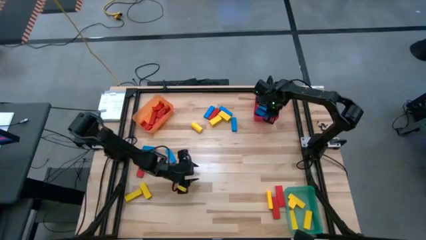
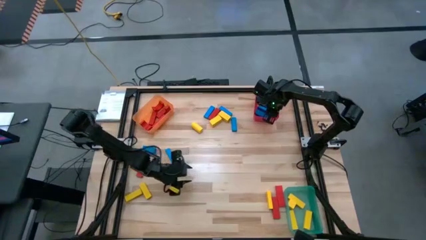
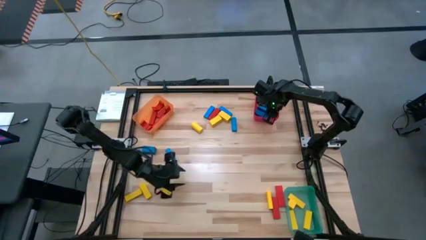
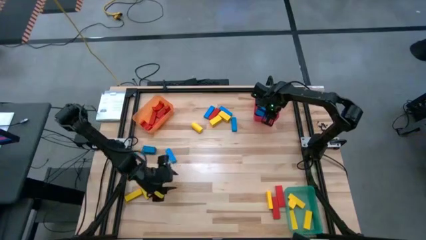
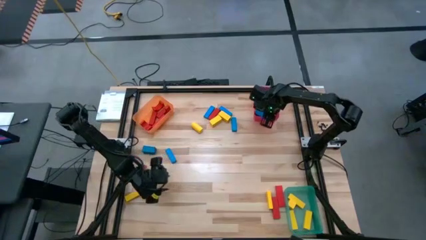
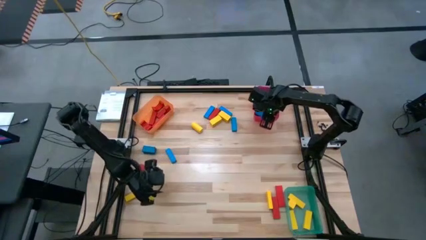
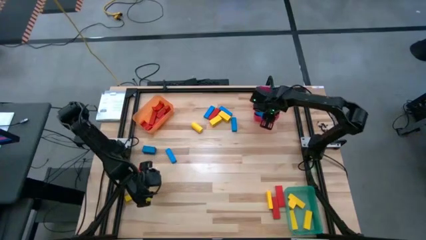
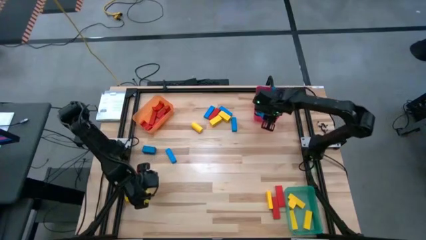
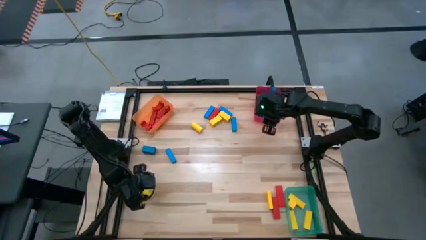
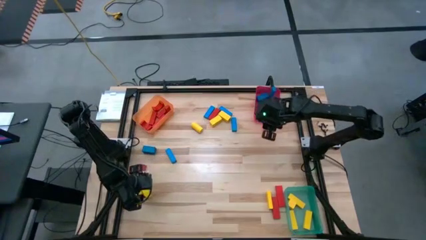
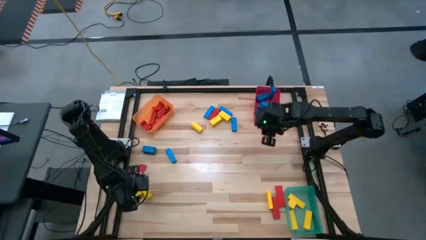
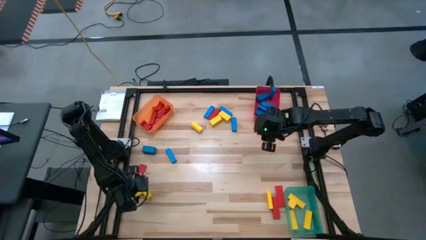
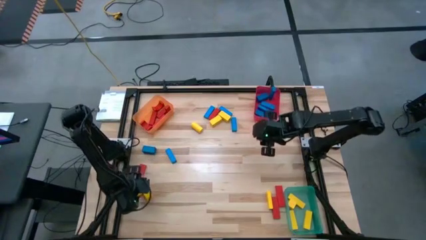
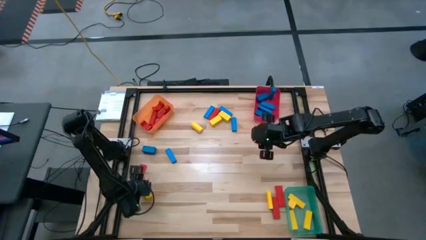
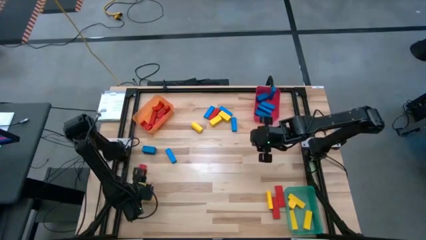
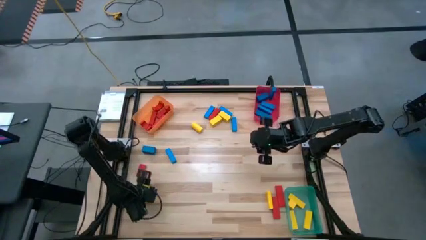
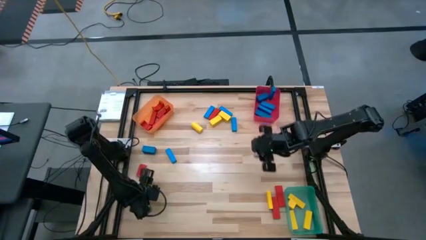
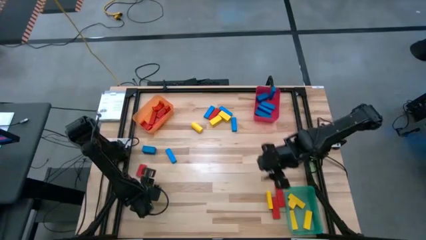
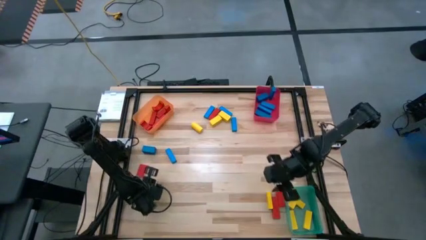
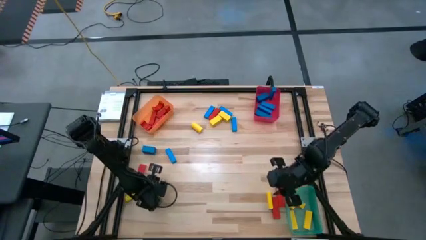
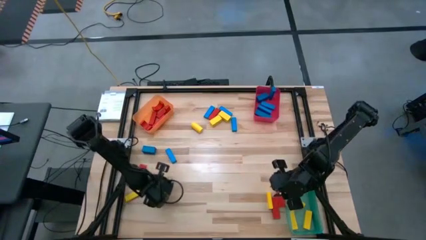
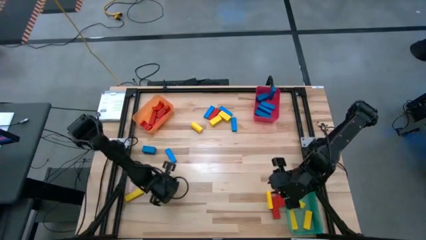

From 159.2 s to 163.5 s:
Task: Sort blocks
Put the yellow block into the green bin

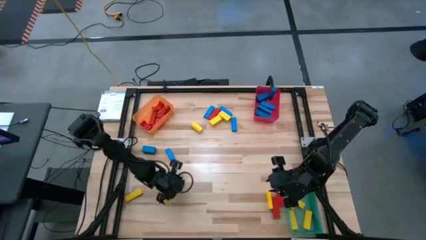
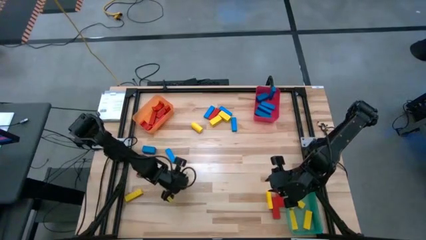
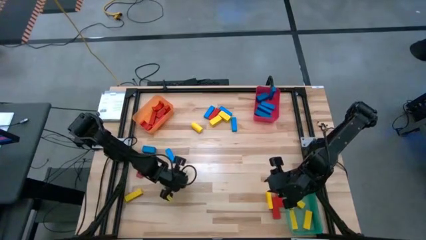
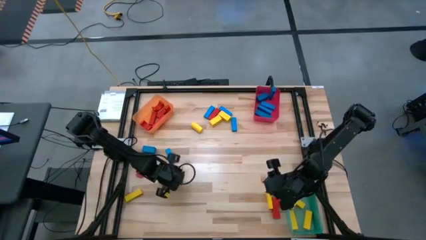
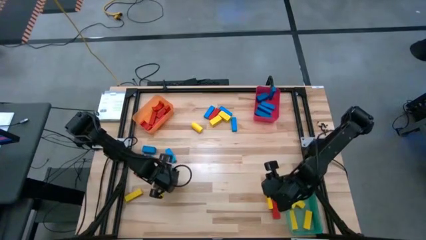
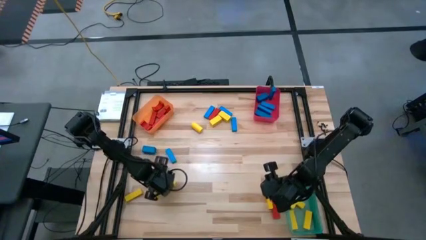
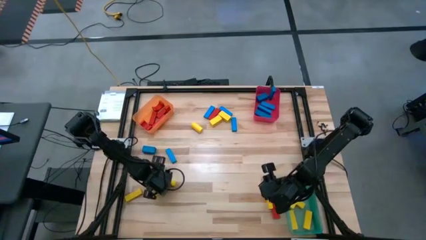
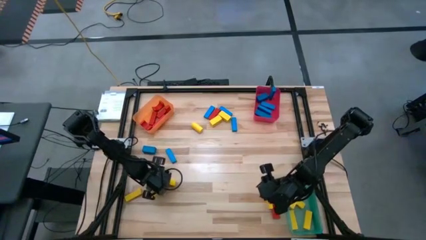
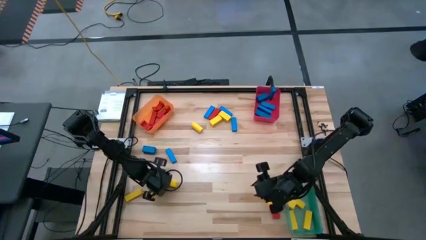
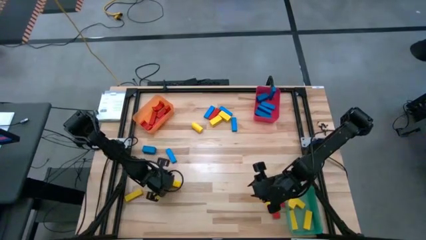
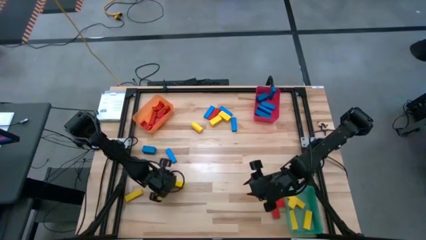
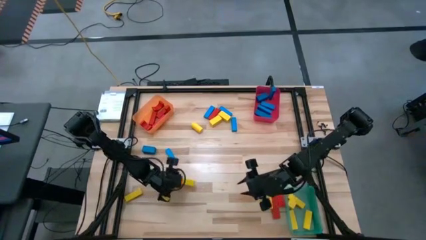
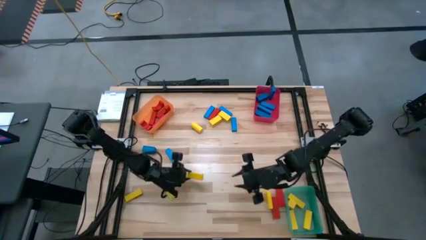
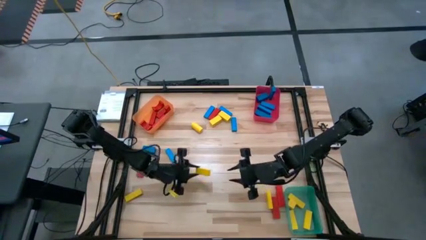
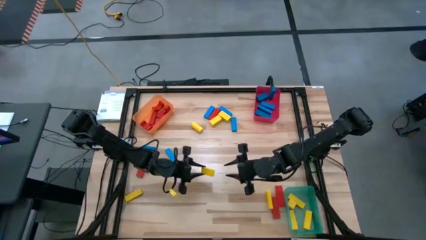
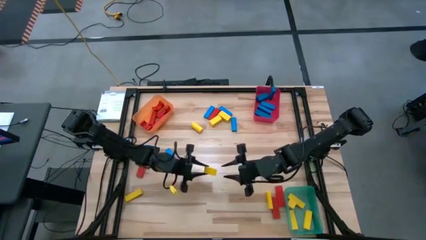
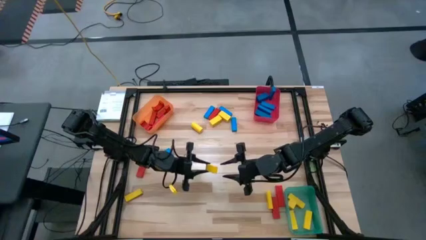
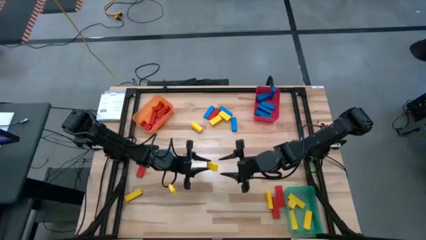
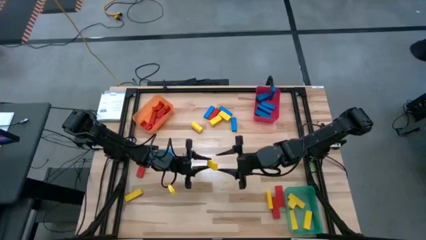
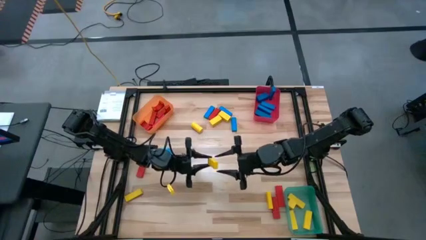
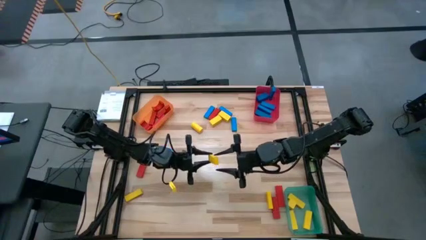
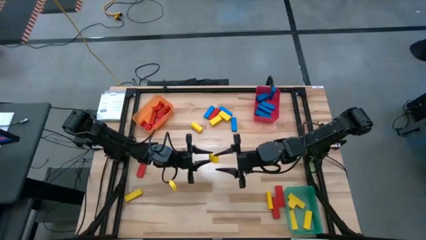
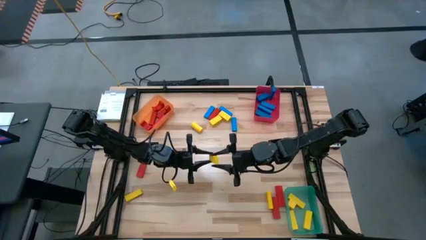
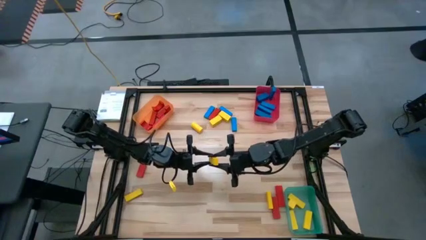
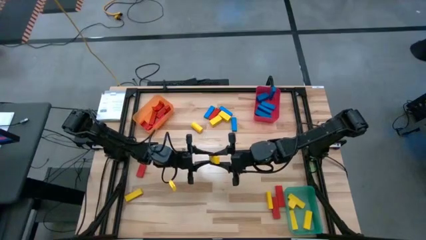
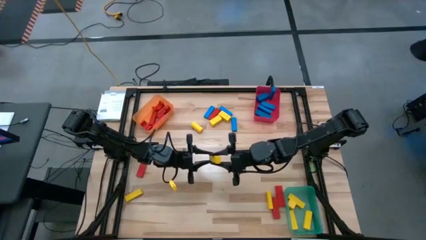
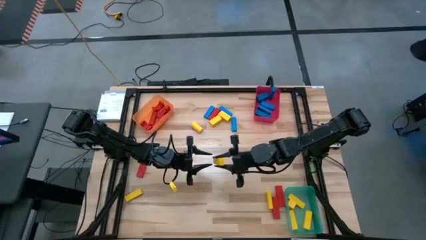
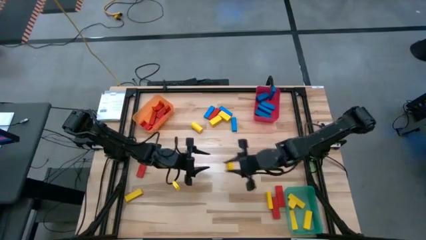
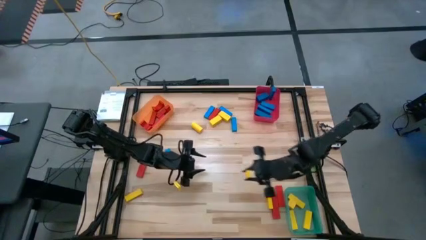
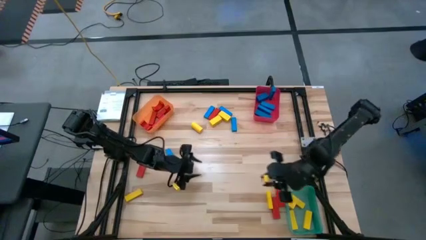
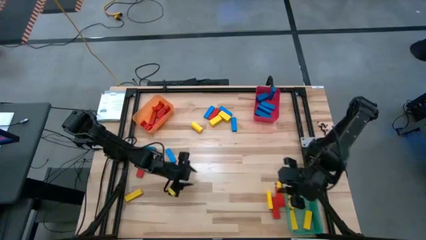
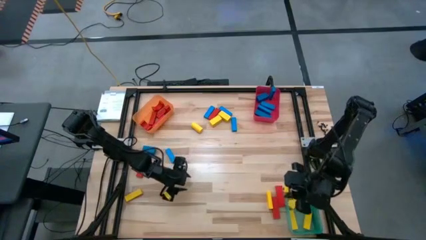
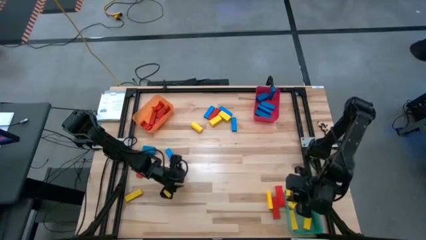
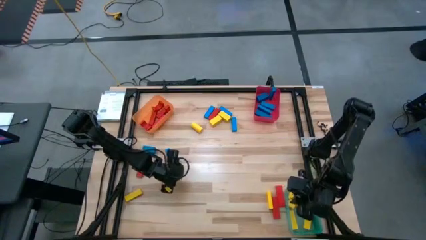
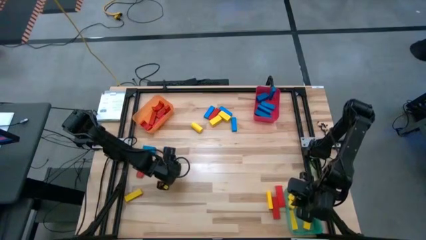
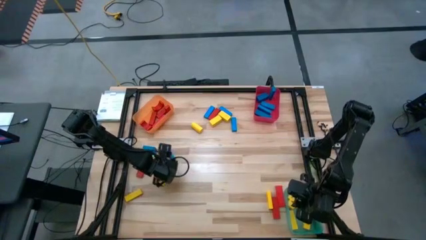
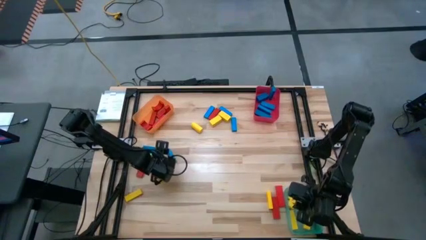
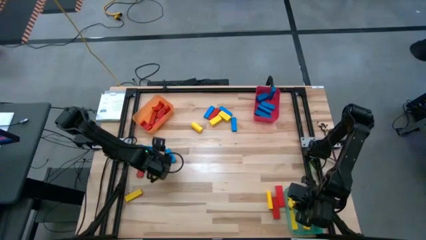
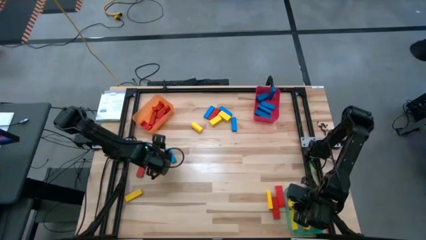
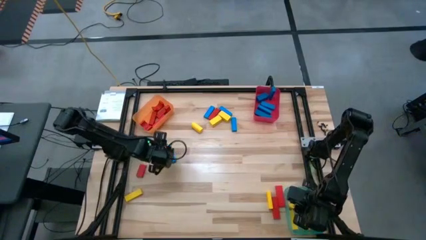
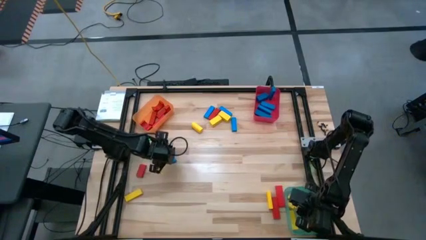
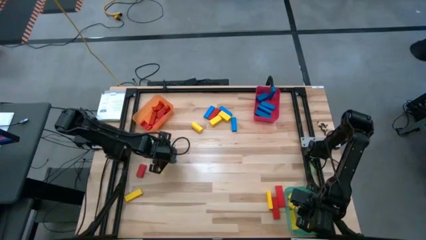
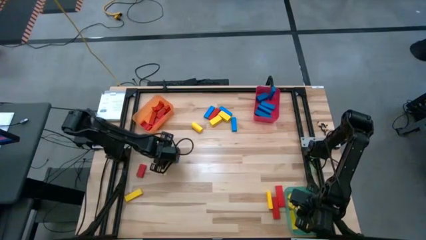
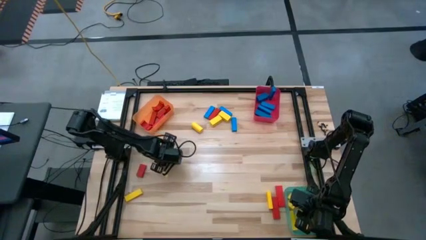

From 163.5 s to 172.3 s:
Put the yellow block into the green bin
